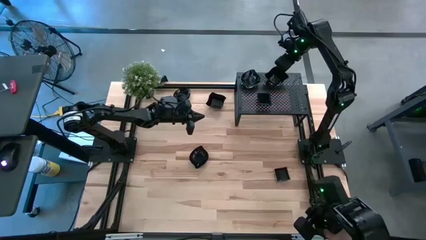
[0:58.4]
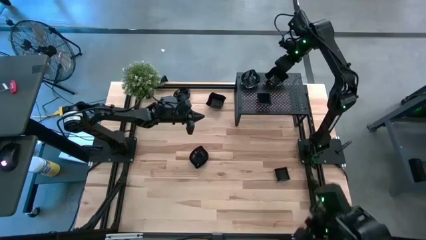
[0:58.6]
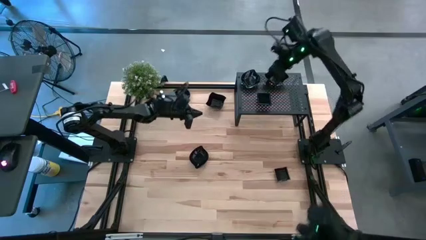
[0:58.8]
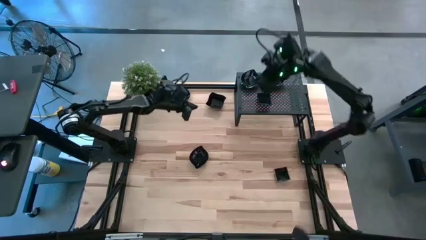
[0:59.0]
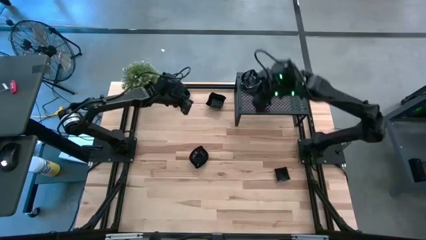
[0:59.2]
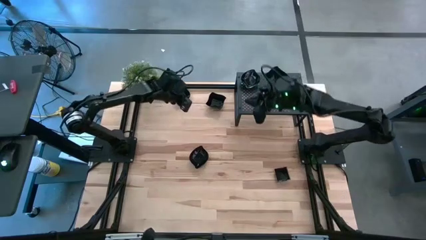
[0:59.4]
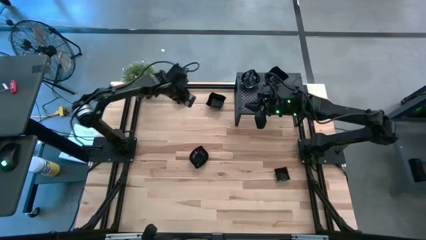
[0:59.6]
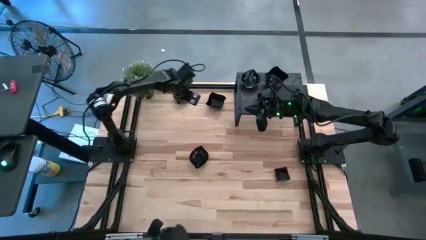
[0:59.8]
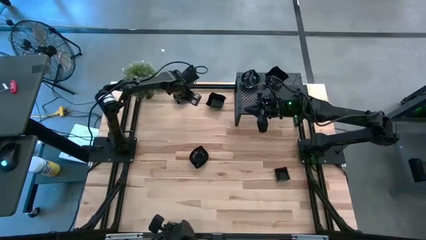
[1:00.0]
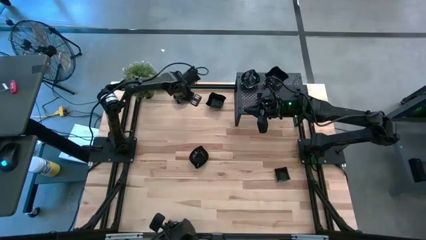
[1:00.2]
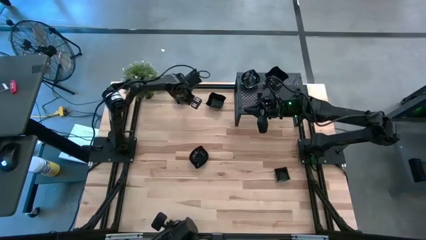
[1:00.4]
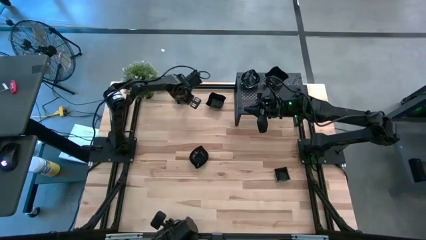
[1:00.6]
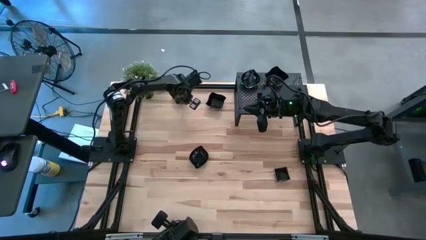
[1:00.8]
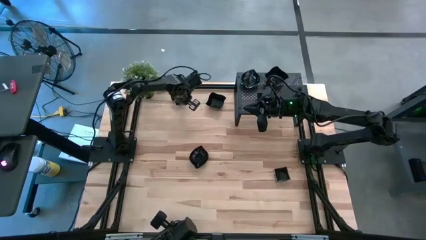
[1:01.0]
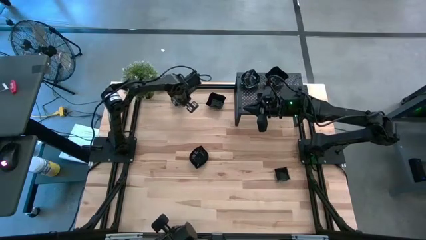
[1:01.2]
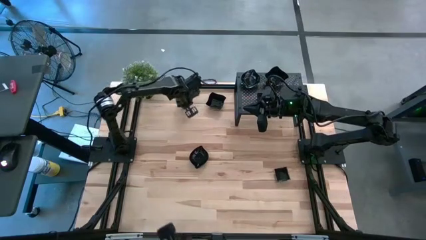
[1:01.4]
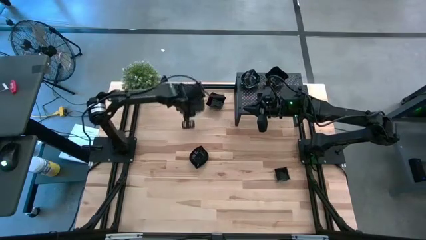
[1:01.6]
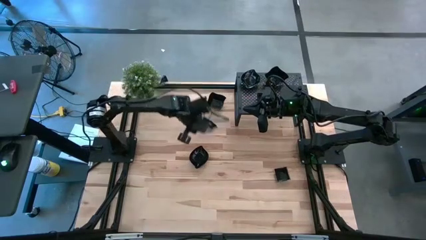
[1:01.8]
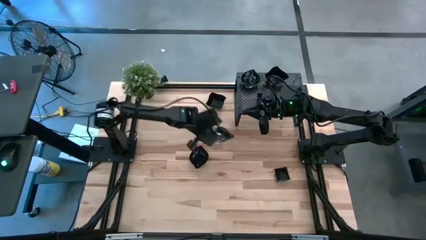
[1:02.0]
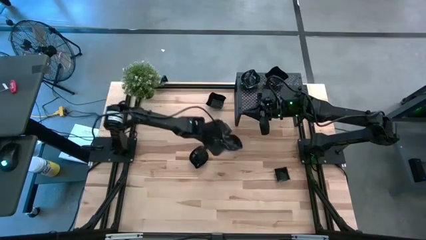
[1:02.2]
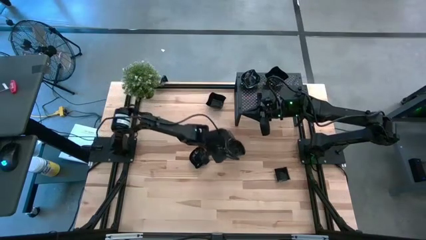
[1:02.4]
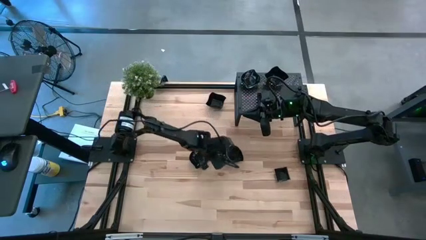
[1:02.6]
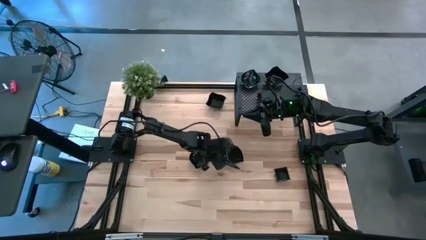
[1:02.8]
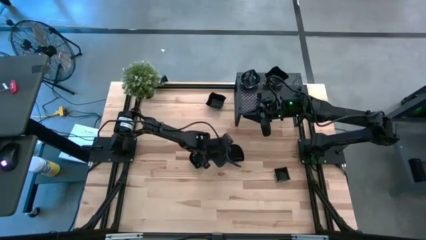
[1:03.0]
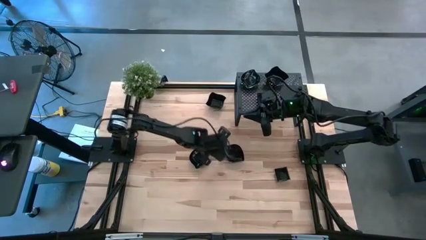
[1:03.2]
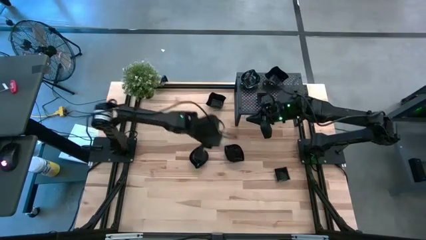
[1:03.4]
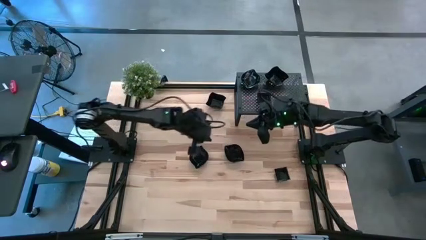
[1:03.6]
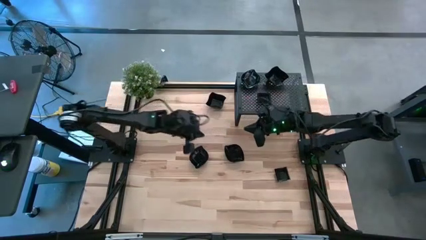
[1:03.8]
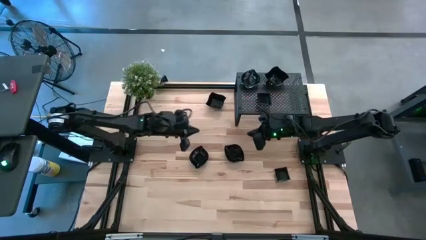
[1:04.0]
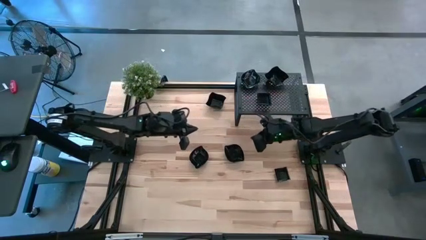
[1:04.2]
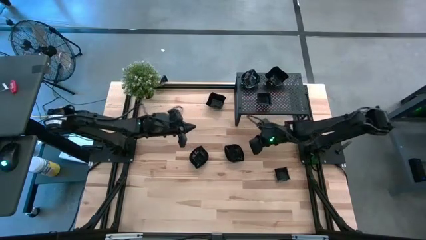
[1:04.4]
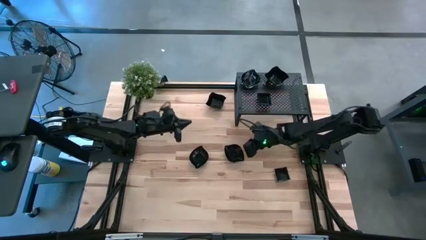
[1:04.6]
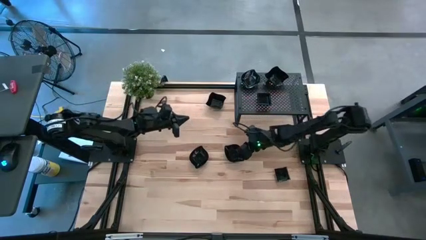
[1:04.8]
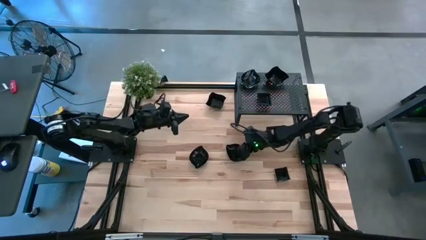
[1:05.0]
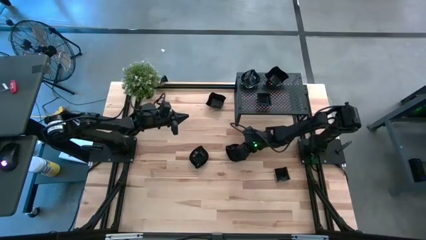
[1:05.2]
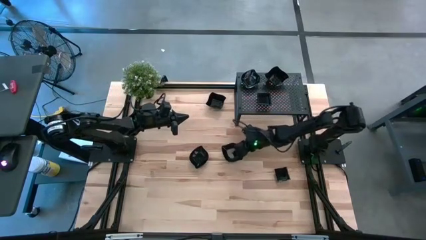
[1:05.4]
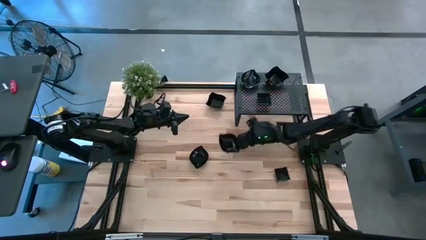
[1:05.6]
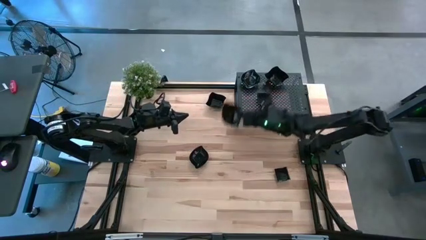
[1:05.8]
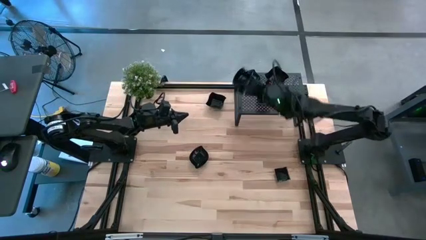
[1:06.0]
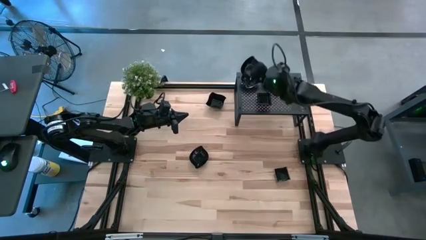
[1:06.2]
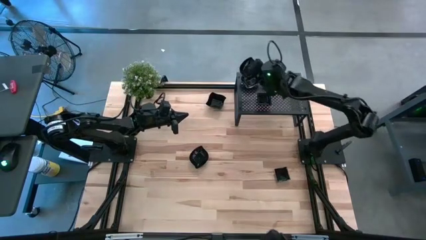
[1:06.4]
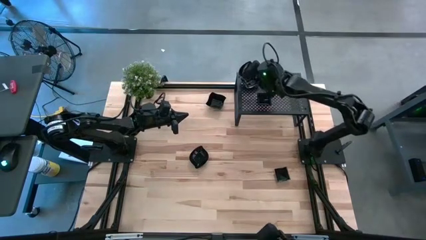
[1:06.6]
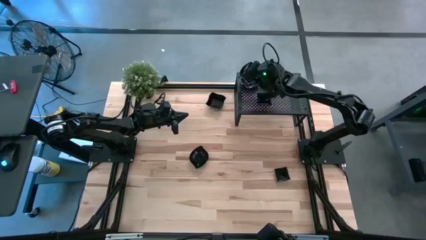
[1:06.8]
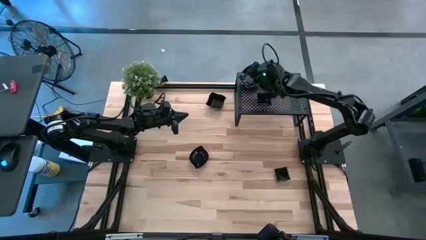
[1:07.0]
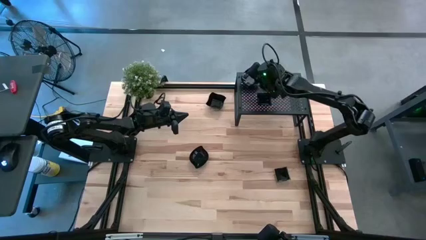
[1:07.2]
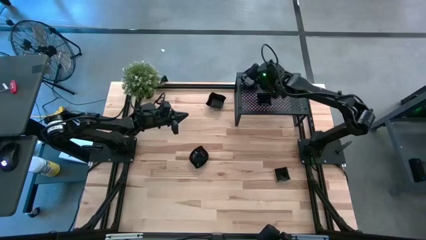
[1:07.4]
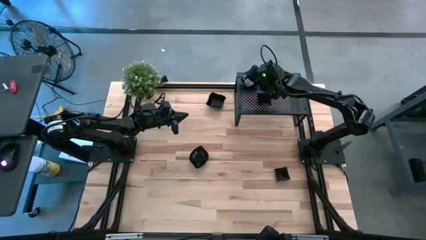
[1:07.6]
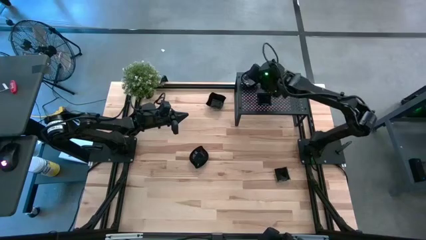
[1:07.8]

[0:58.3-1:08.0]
Task: Pick & Place Mini shaped plates
Stack the black leaf-shaped plate on top of the black leaf-shaped plate on the shelf

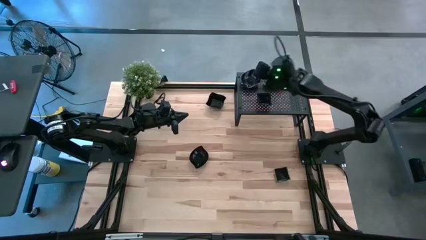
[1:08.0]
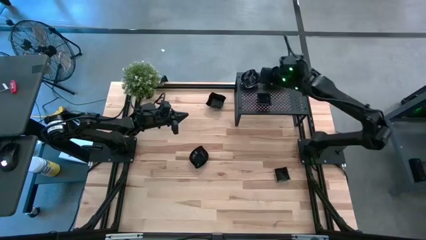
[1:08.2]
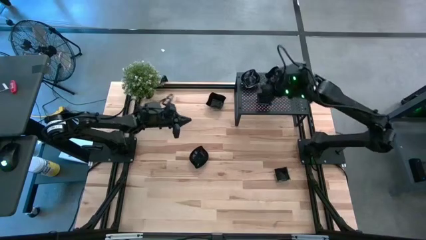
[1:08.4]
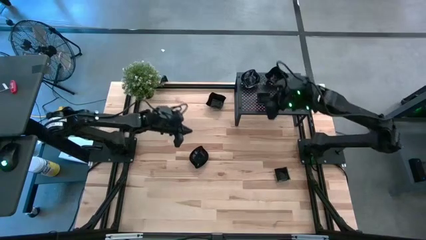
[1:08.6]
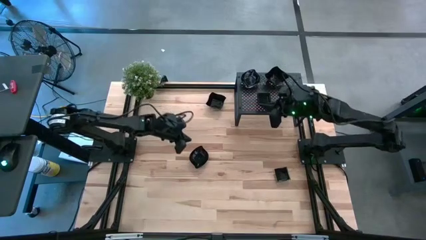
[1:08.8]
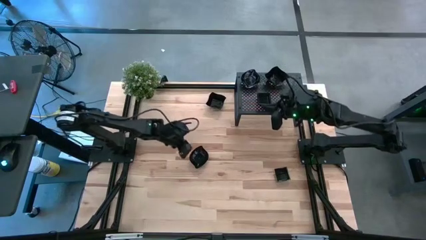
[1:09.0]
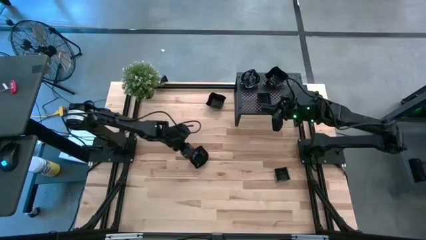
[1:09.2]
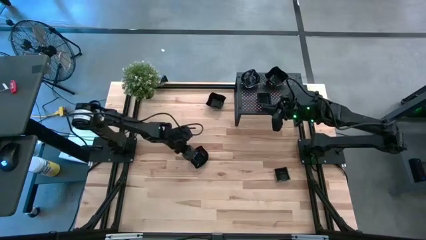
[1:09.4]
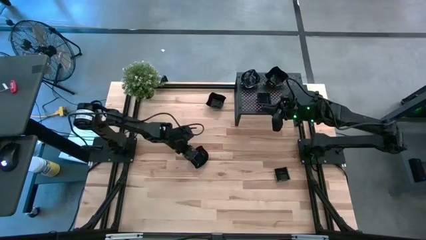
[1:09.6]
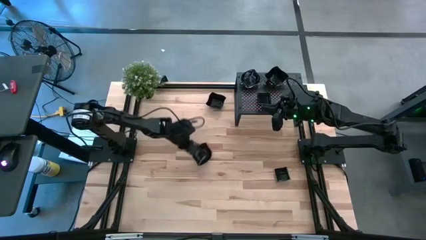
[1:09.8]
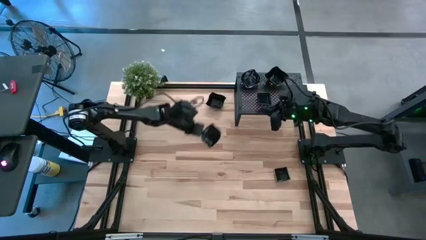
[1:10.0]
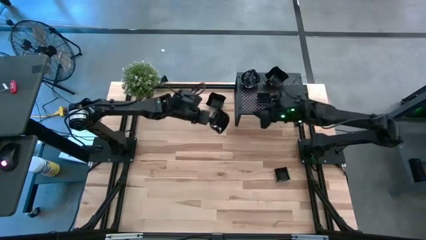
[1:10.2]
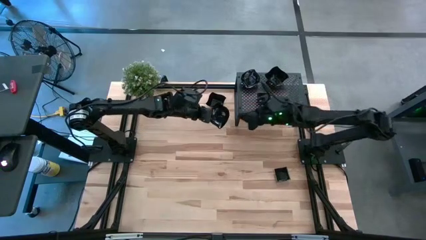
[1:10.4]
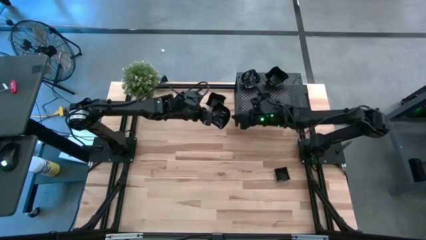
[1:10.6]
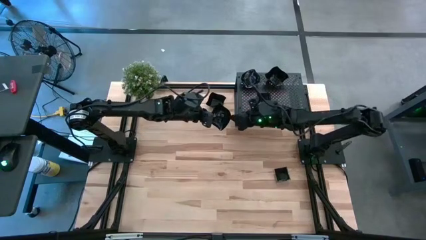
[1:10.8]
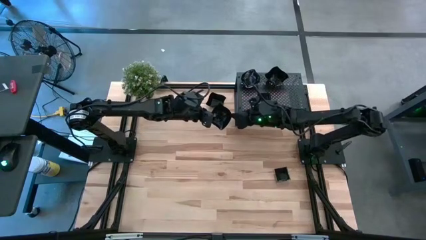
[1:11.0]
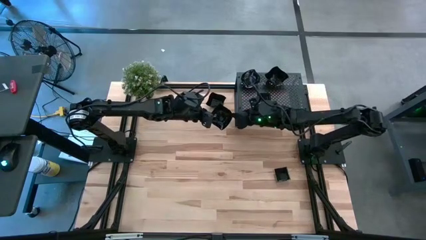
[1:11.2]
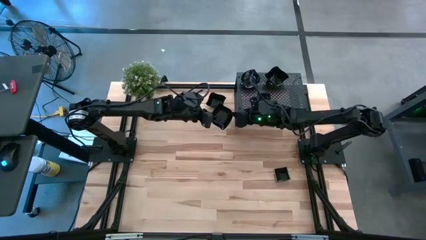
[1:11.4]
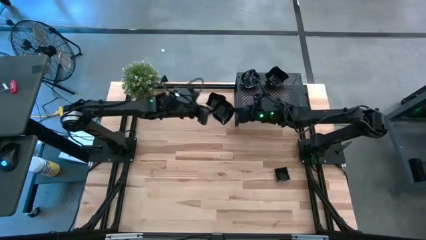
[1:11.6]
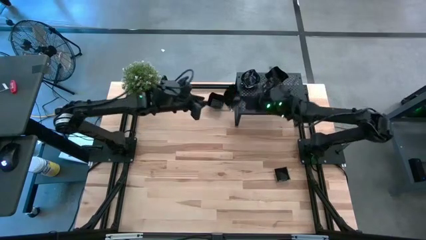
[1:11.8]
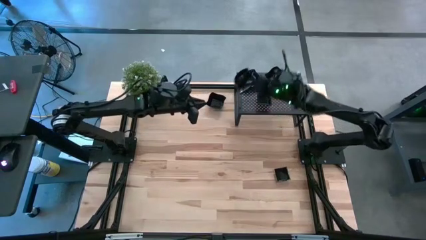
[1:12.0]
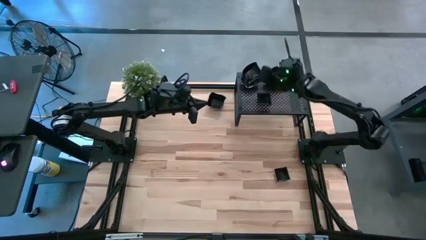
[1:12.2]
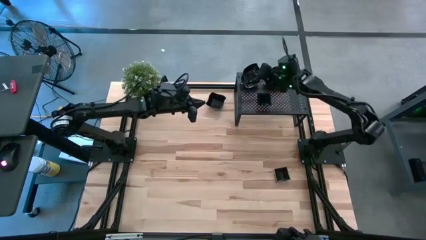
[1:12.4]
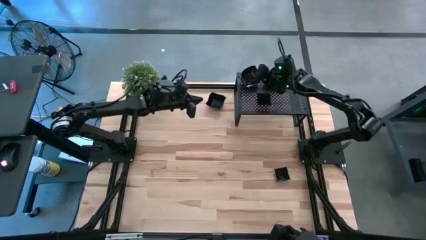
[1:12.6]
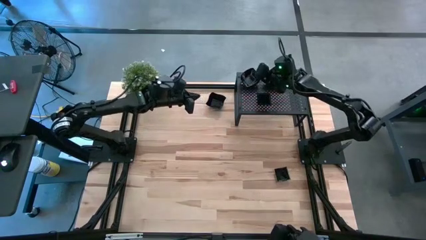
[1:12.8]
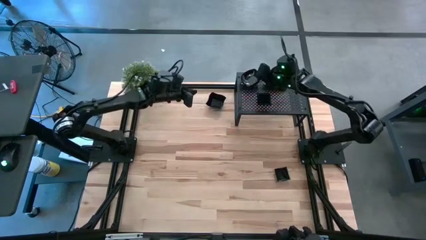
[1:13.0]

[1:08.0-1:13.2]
Stack the black leaf-shaped plate on top of the black leaf-shaped plate on the shelf

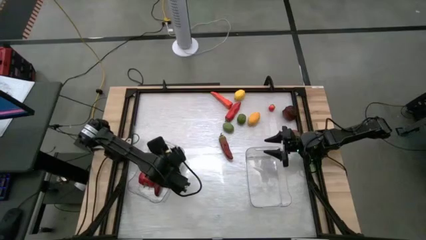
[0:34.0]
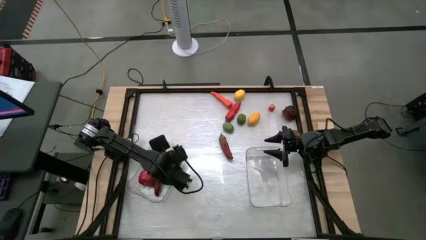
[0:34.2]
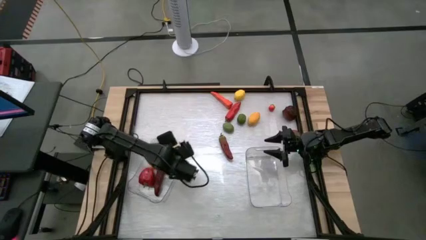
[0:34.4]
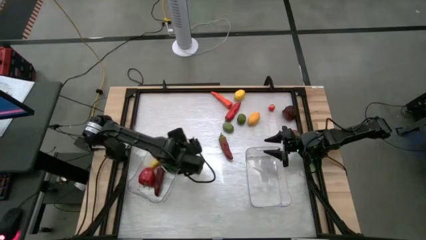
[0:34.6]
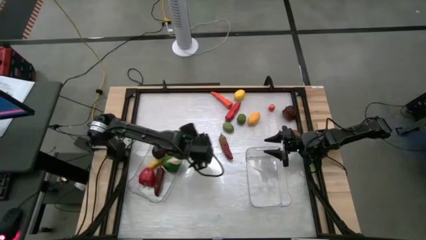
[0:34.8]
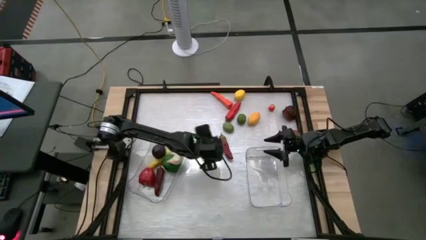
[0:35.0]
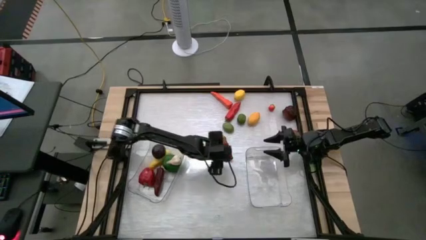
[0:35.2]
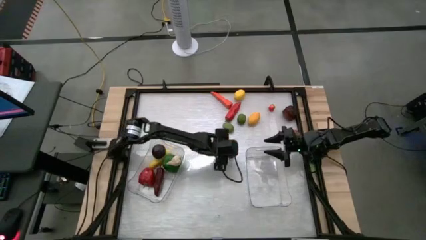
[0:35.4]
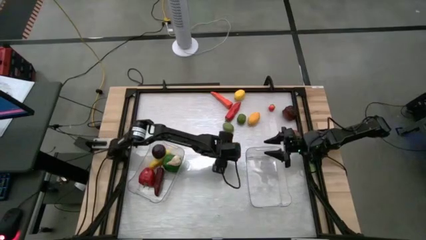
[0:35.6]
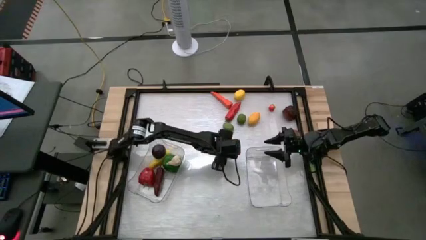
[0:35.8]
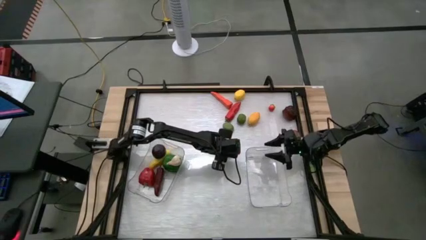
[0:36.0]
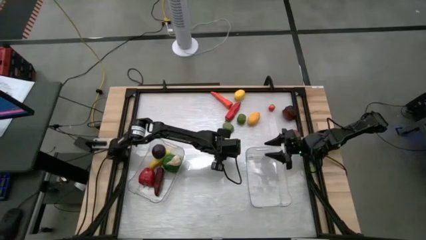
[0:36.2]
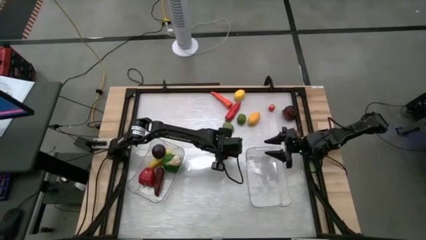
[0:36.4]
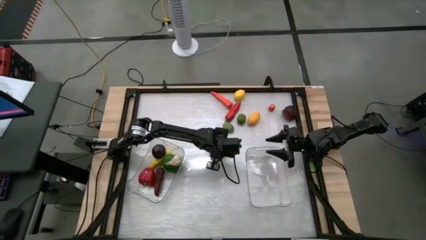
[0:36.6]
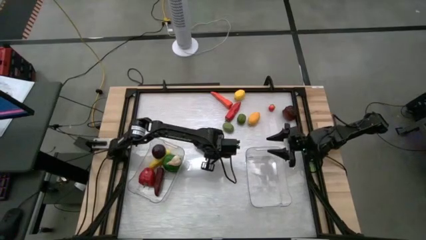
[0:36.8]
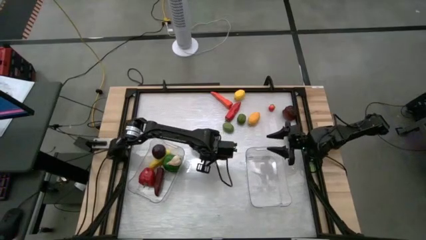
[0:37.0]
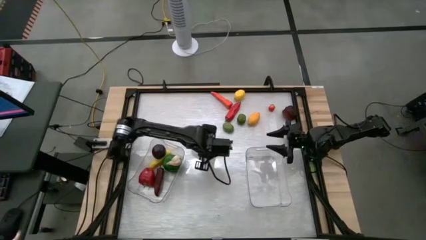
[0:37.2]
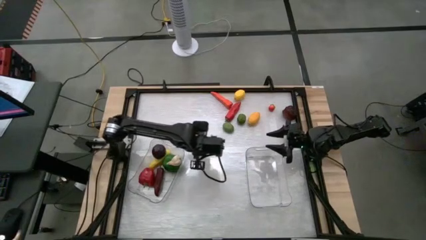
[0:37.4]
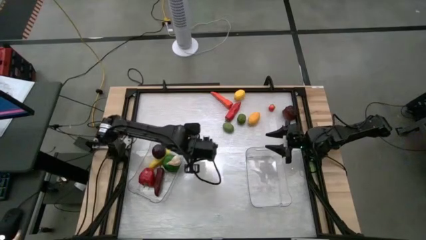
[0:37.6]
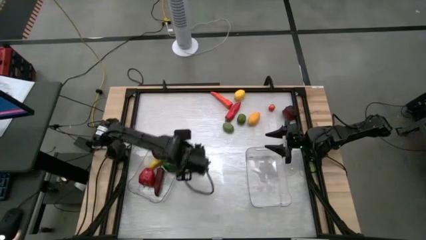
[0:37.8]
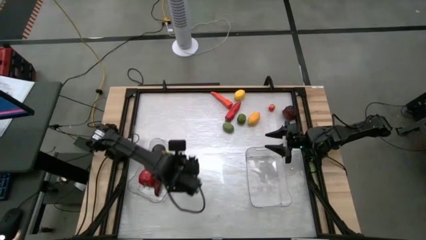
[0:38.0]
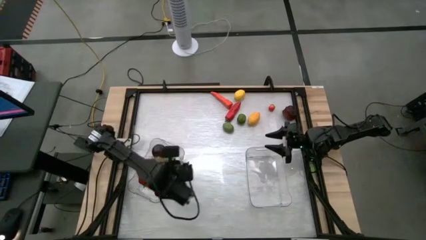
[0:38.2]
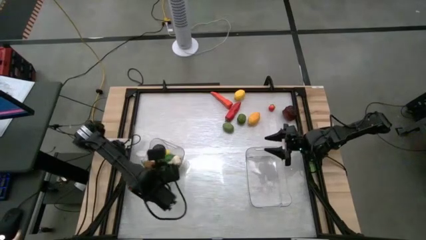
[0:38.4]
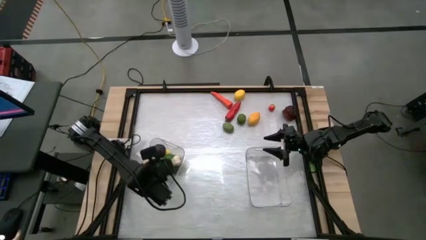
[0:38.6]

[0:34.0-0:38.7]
Task: Sort produce into baskets
Put the dark red chili pepper into the left transparent bin
